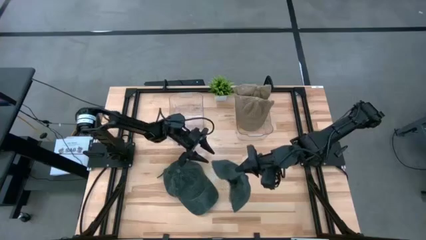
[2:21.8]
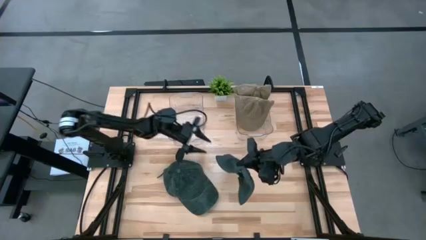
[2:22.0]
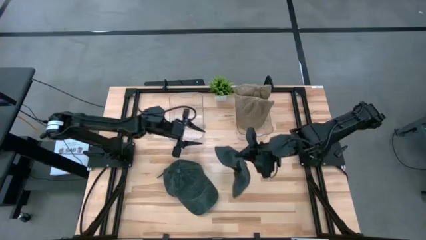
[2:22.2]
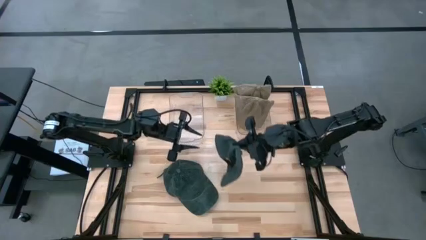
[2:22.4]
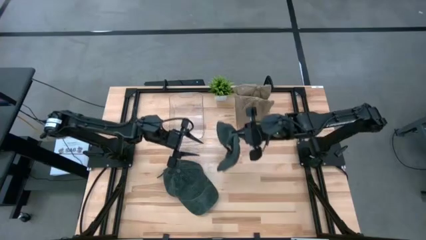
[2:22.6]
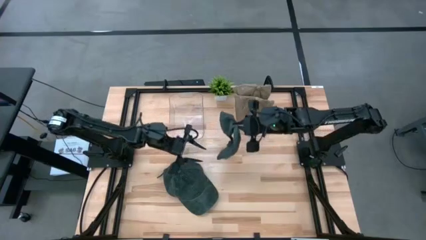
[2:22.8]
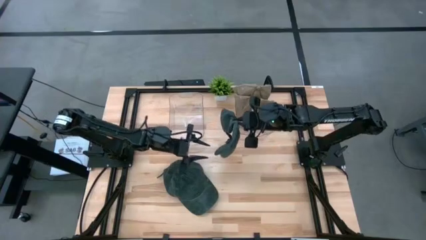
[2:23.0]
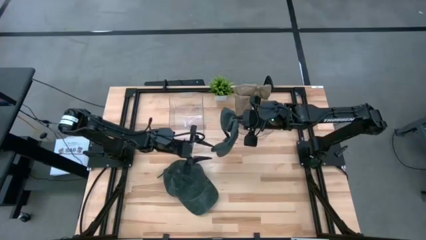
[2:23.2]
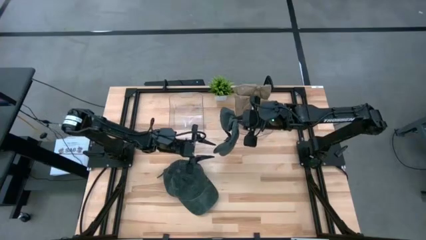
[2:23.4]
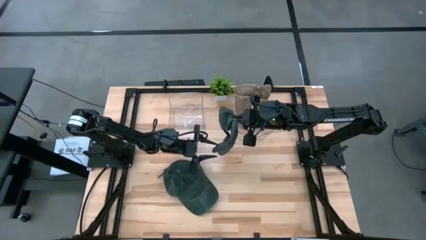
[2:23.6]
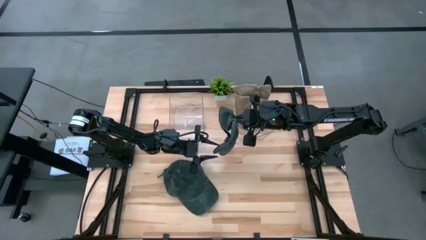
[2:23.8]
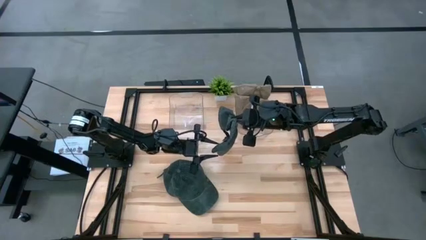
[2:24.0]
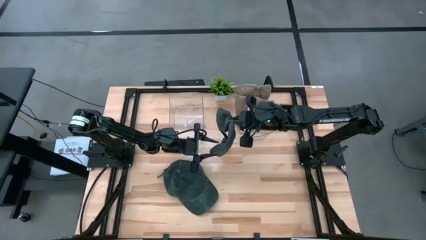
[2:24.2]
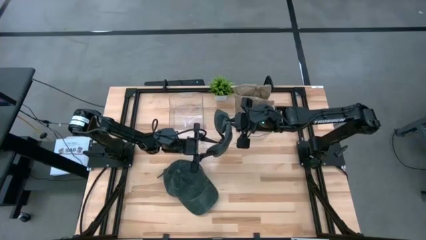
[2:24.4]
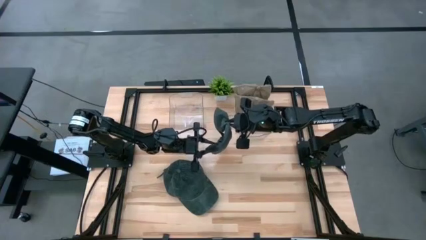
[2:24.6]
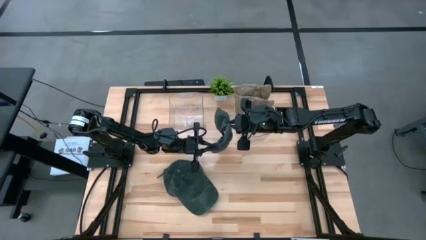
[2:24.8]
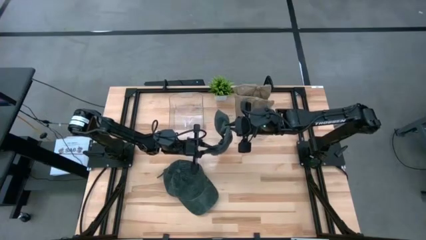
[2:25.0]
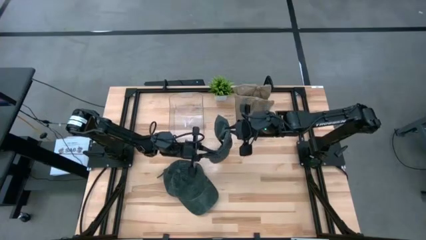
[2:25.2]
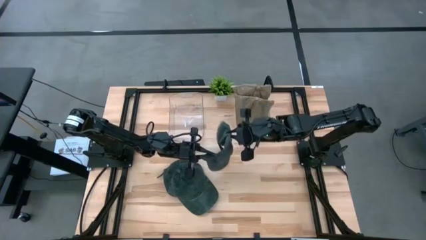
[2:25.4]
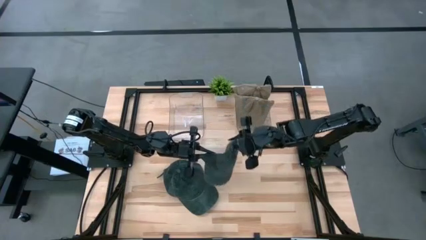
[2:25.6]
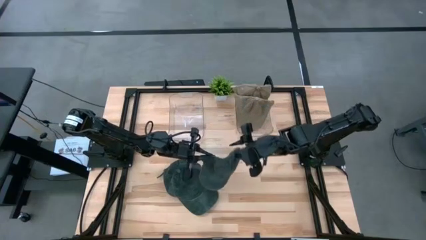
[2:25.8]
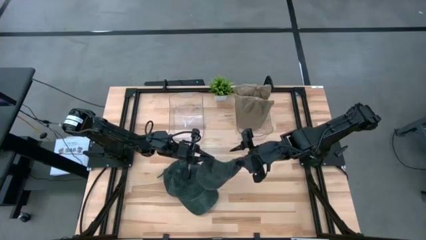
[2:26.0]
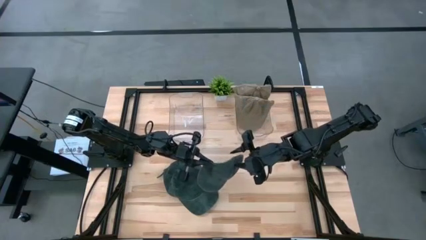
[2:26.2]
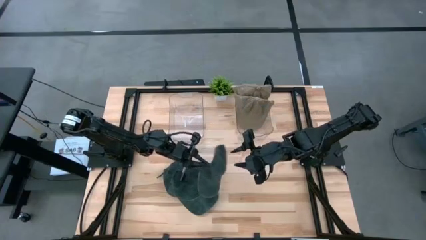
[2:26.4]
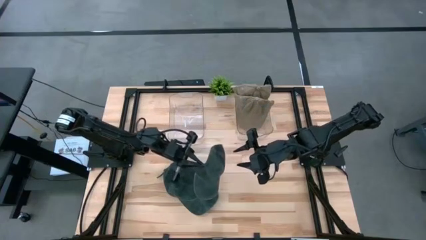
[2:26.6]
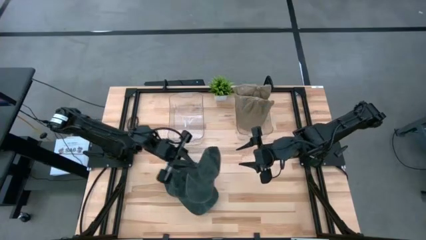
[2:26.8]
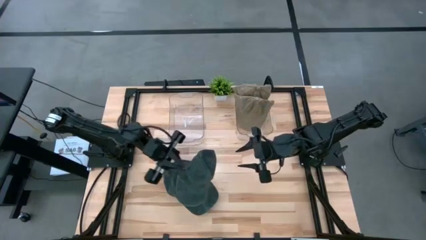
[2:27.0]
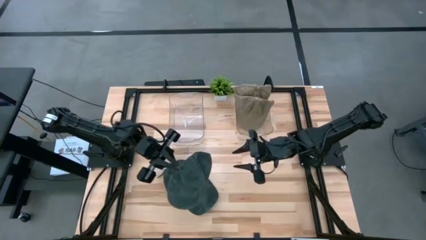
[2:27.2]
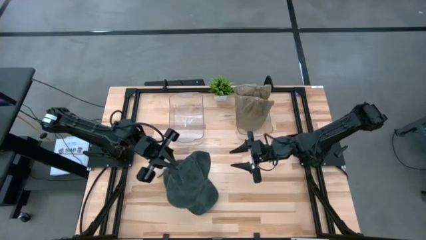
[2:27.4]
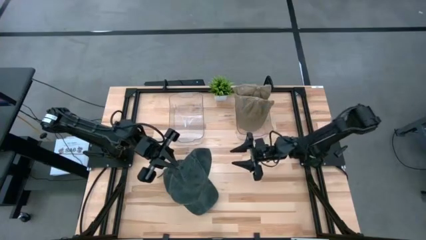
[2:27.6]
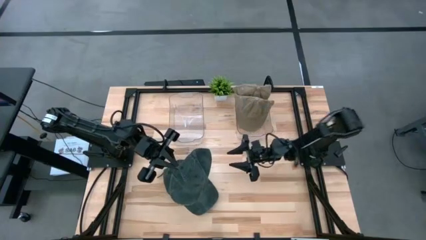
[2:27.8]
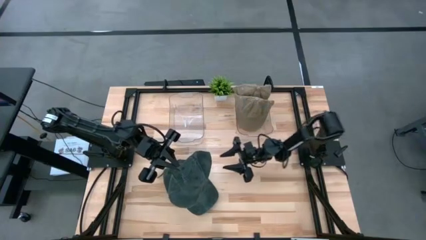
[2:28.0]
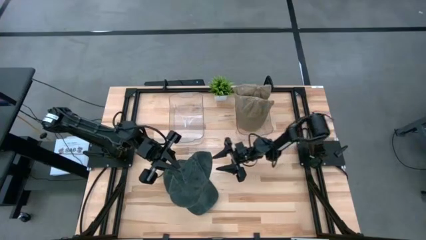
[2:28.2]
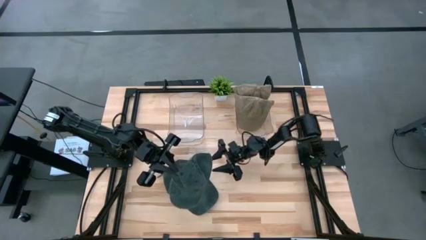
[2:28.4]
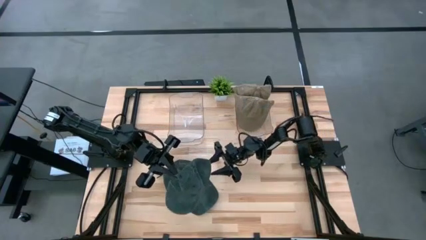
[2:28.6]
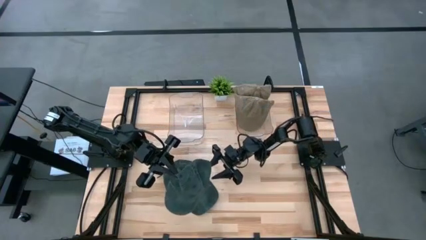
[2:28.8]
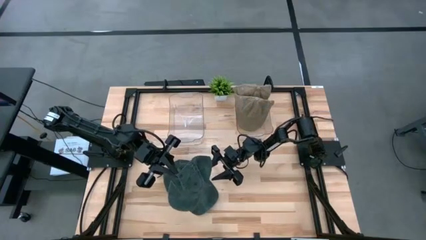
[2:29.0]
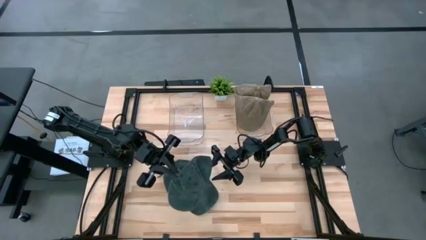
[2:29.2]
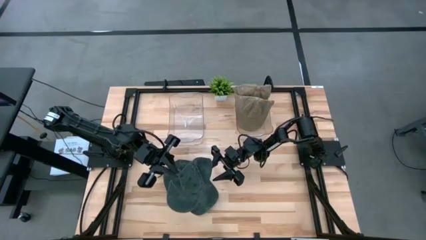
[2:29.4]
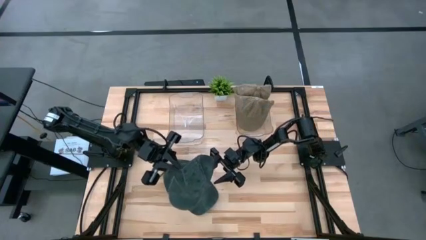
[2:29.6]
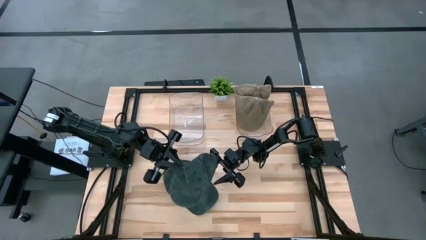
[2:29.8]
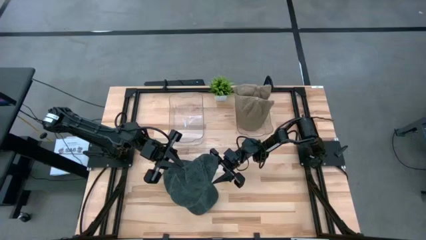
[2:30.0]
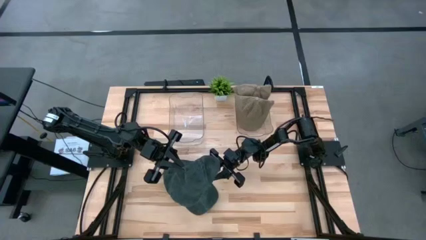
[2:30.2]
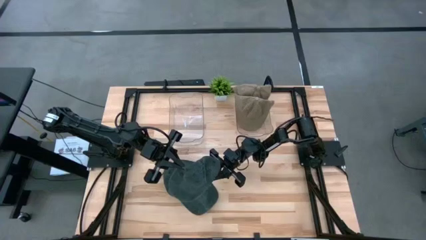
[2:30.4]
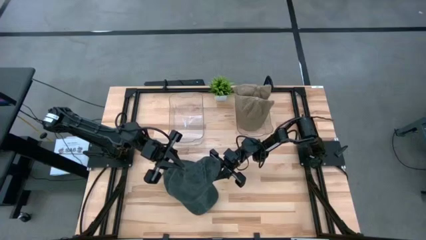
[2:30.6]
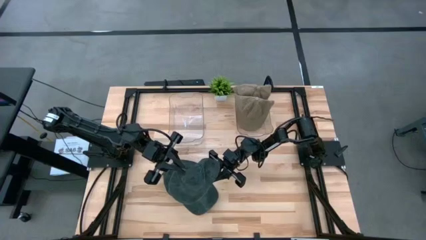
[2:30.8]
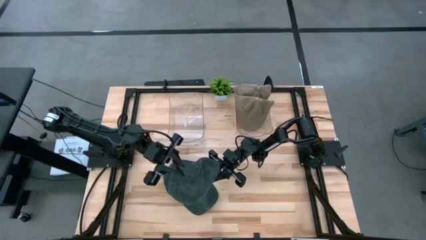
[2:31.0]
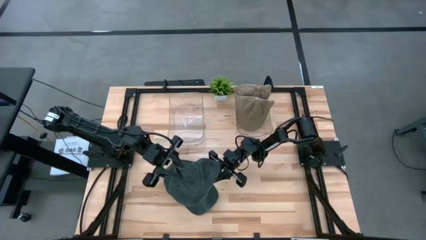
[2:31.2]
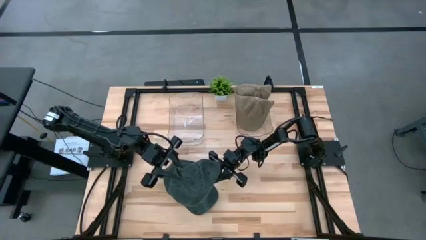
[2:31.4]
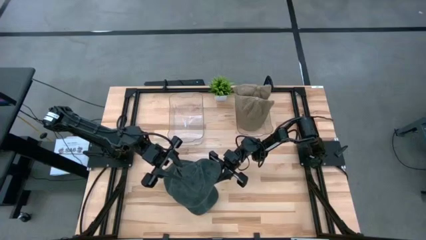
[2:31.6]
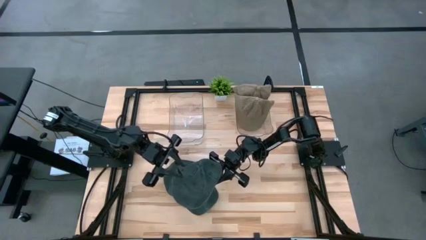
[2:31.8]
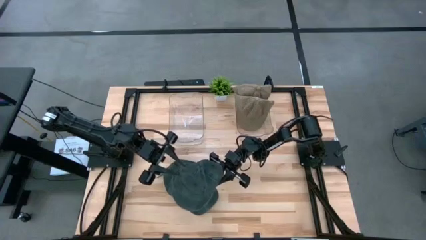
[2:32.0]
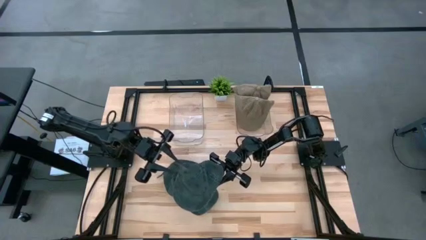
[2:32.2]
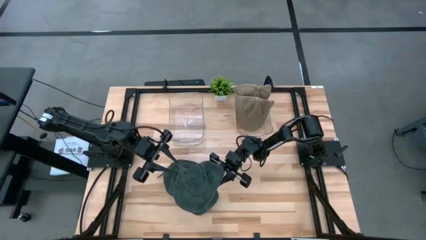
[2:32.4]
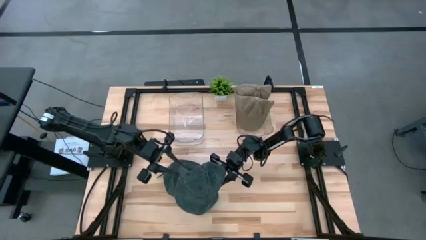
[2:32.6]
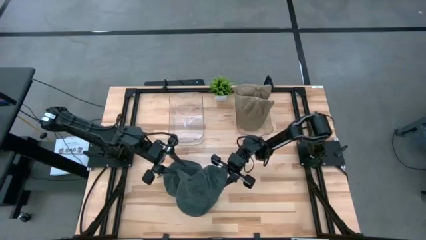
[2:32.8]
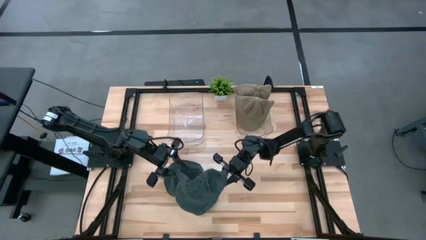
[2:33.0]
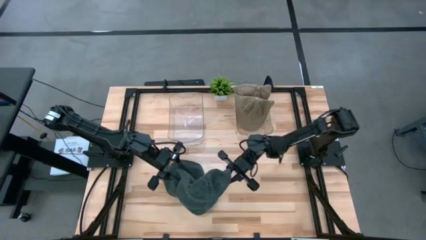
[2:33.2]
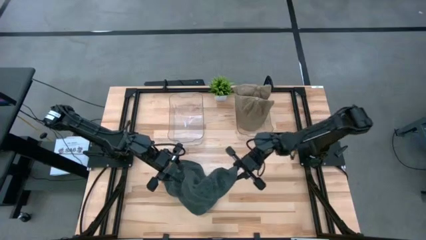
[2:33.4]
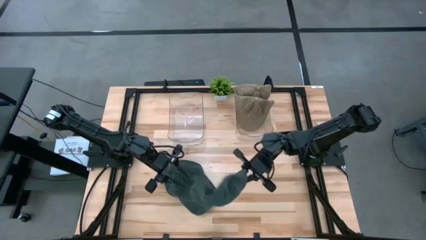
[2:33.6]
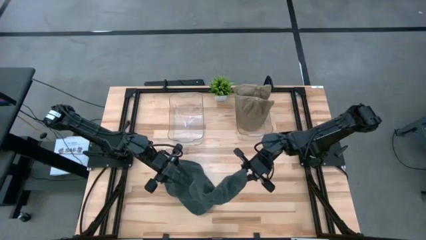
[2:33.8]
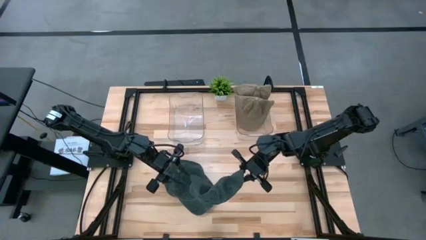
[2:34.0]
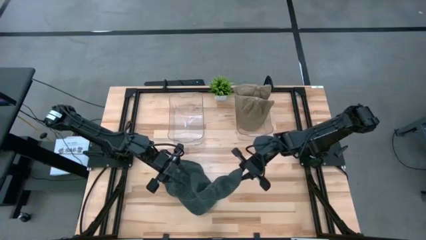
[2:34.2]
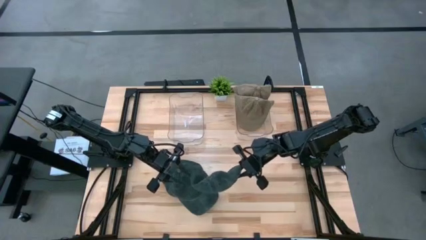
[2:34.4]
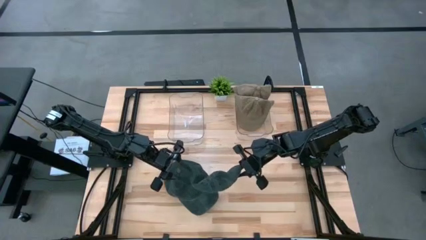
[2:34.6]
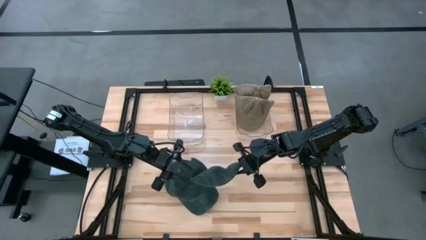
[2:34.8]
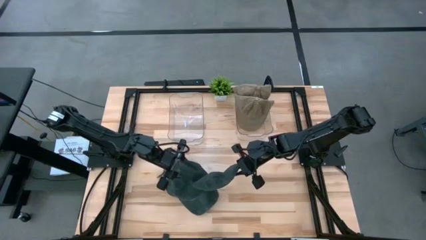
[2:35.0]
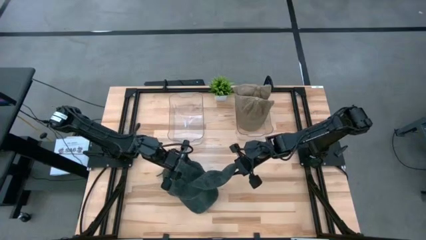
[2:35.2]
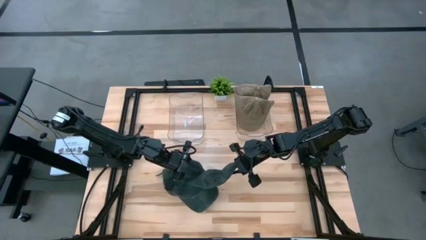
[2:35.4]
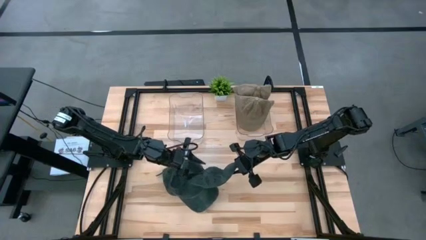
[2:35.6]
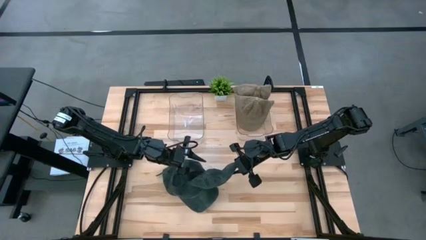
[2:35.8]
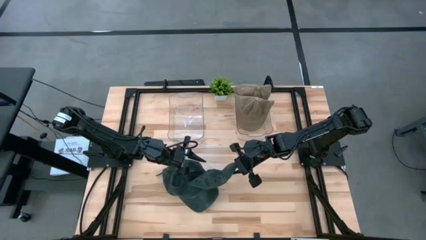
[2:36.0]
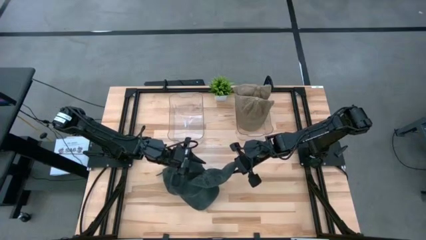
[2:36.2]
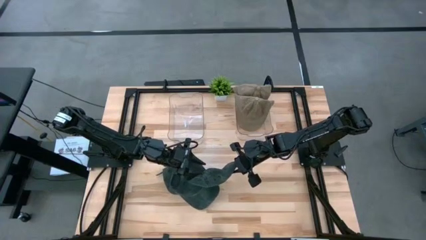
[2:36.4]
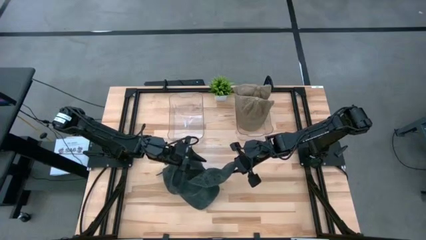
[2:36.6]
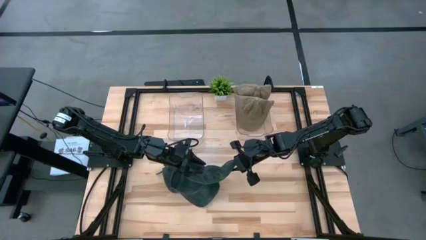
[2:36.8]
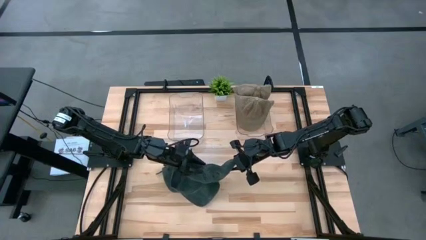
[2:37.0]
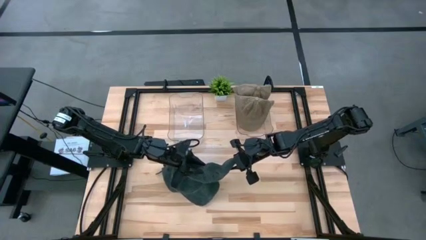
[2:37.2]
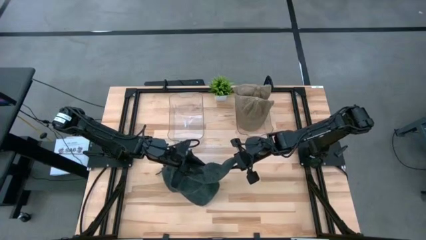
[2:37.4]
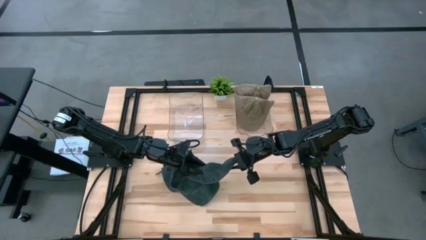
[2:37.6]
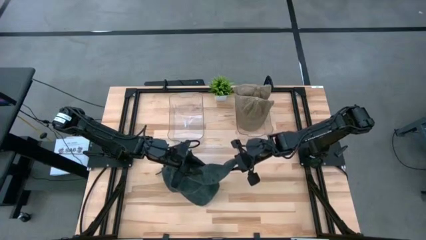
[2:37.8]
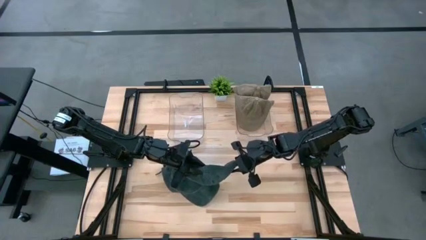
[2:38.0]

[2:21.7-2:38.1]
Task: Pick & Place hat
Put the right black cap into the left transparent container
